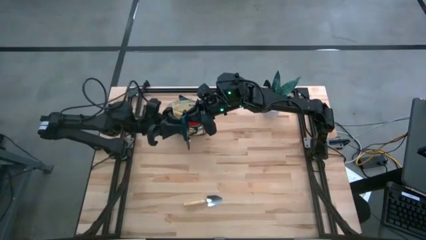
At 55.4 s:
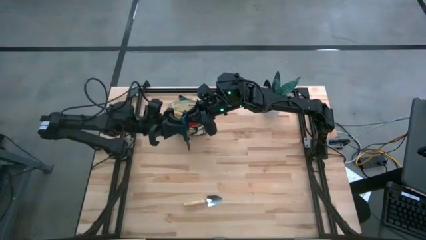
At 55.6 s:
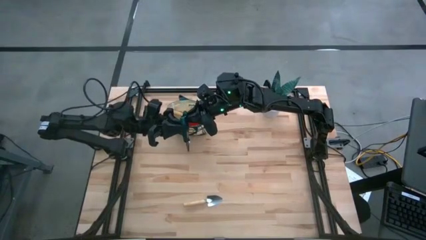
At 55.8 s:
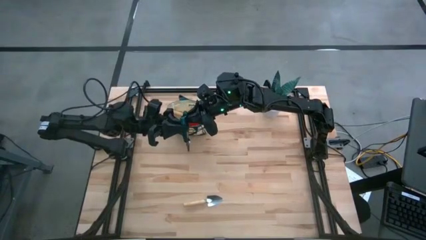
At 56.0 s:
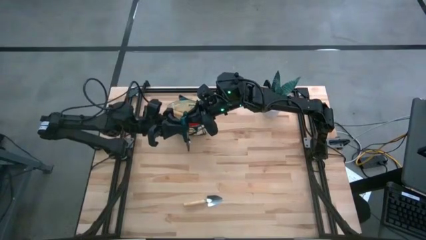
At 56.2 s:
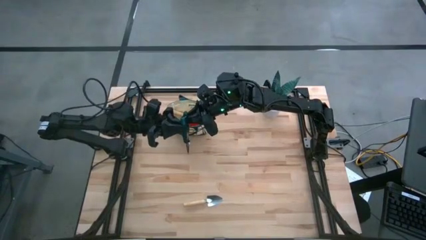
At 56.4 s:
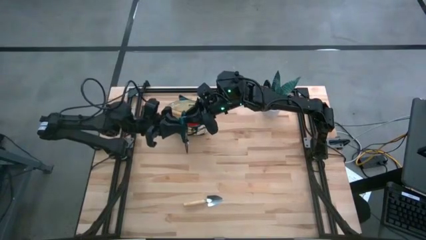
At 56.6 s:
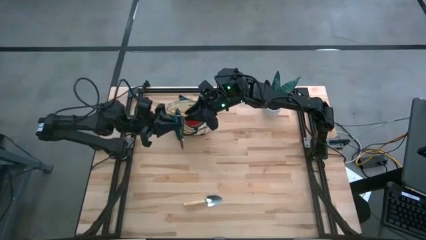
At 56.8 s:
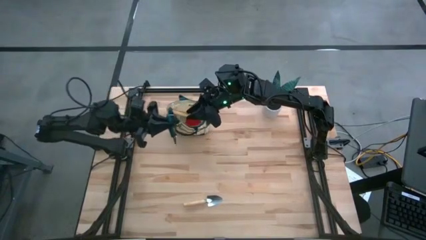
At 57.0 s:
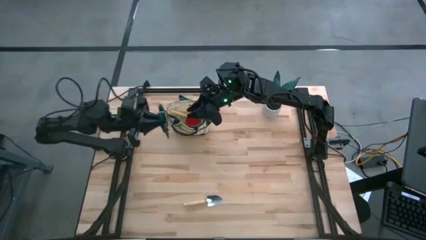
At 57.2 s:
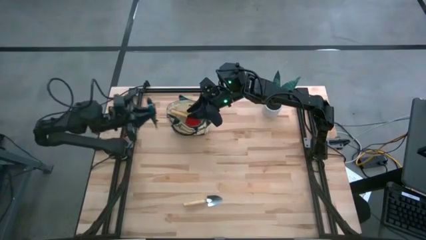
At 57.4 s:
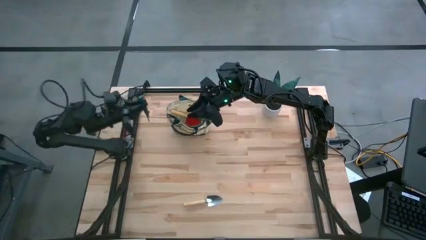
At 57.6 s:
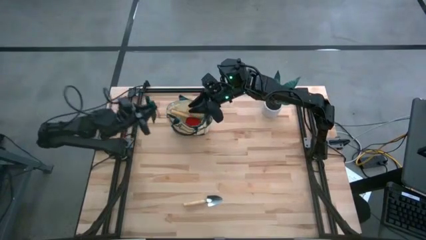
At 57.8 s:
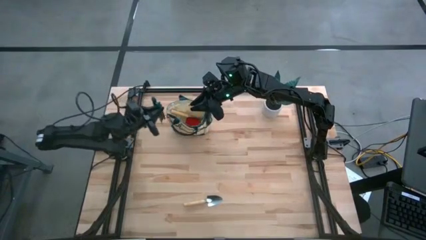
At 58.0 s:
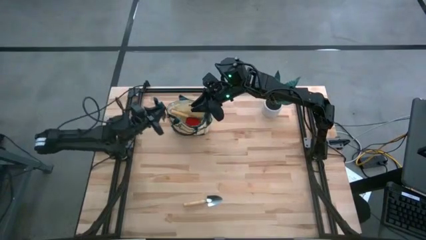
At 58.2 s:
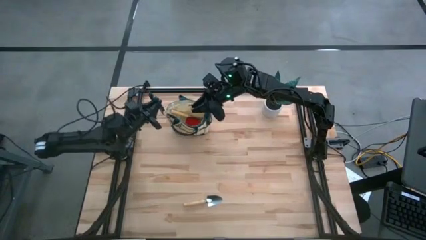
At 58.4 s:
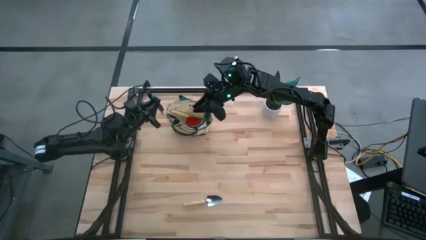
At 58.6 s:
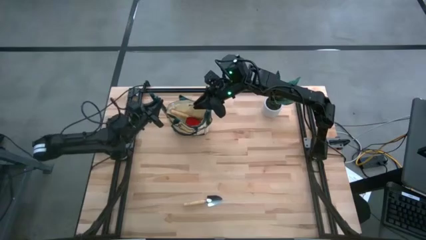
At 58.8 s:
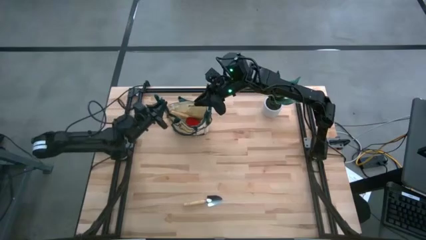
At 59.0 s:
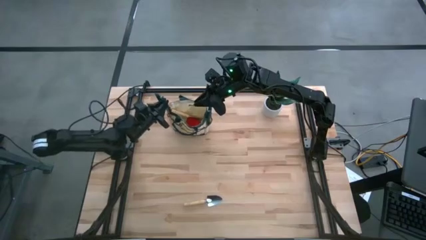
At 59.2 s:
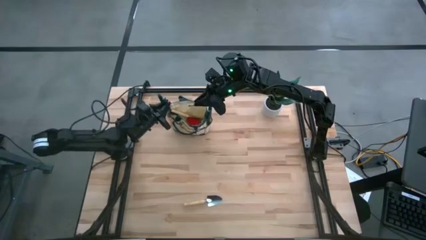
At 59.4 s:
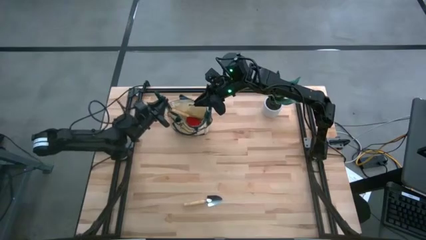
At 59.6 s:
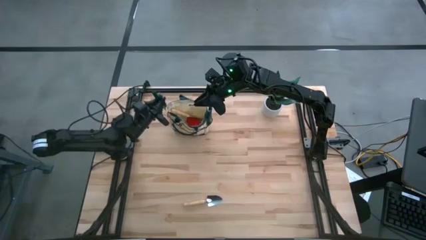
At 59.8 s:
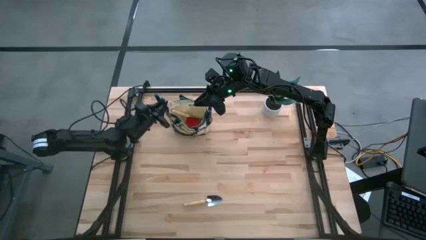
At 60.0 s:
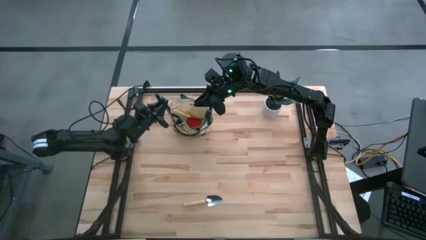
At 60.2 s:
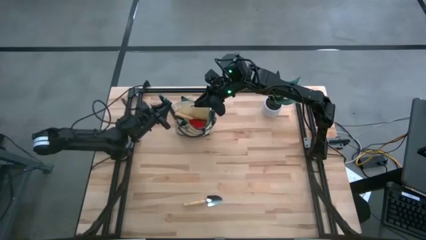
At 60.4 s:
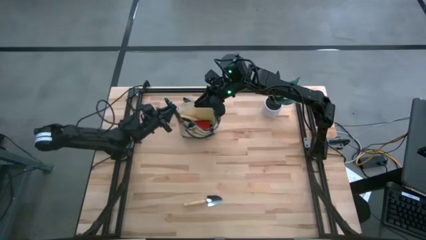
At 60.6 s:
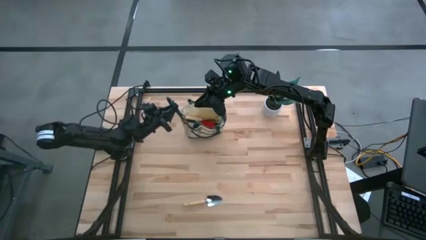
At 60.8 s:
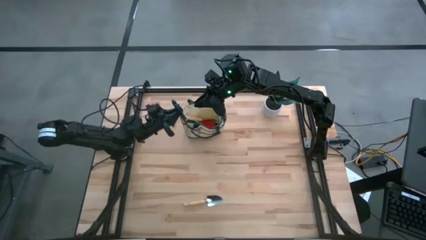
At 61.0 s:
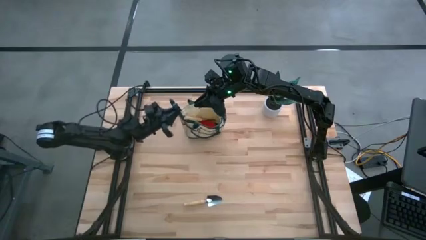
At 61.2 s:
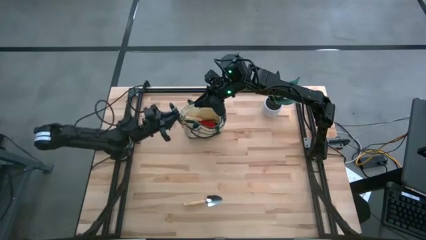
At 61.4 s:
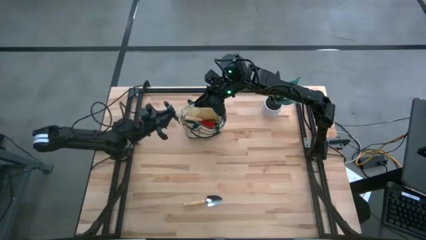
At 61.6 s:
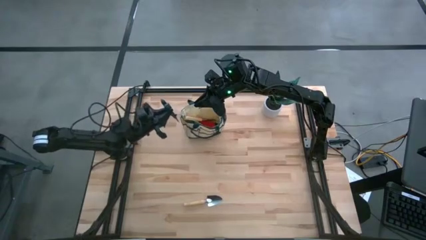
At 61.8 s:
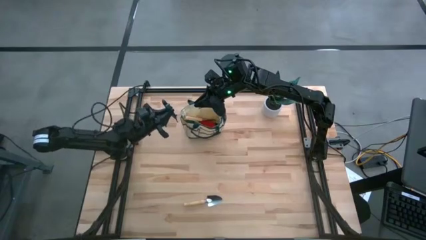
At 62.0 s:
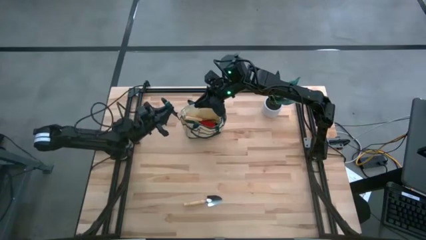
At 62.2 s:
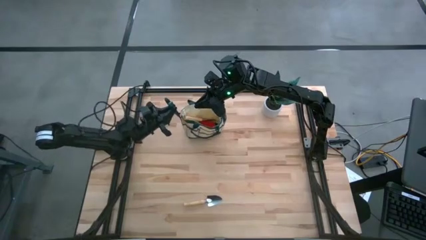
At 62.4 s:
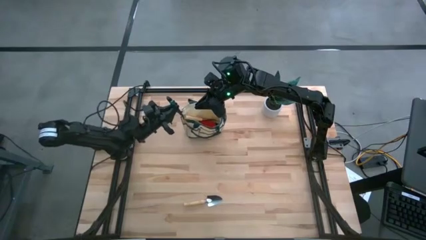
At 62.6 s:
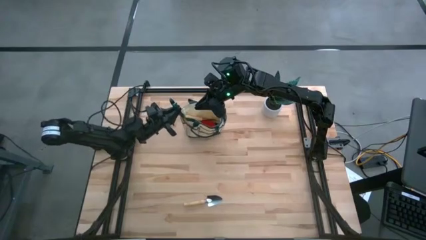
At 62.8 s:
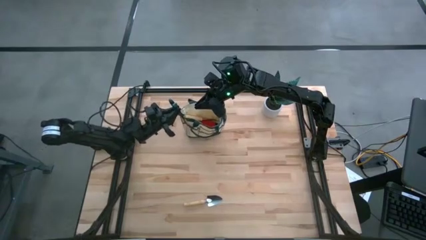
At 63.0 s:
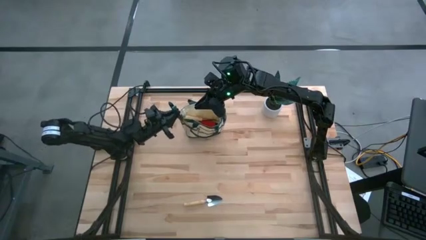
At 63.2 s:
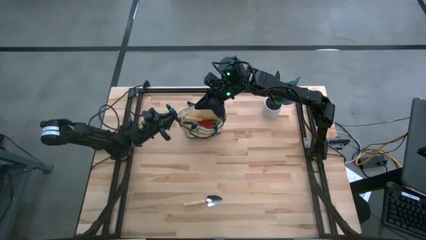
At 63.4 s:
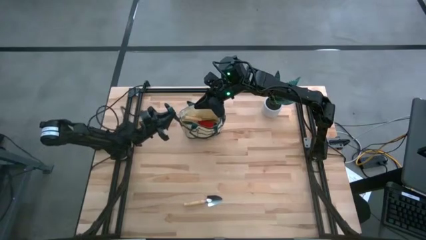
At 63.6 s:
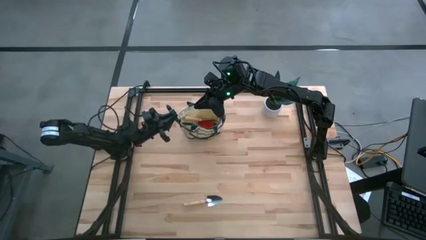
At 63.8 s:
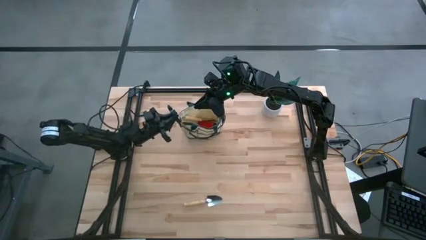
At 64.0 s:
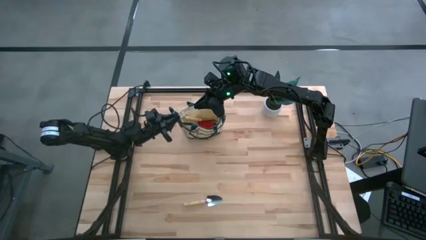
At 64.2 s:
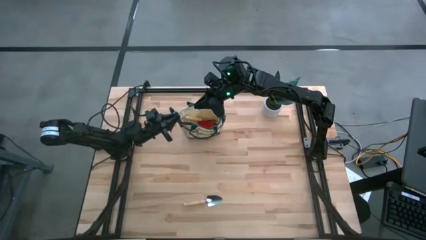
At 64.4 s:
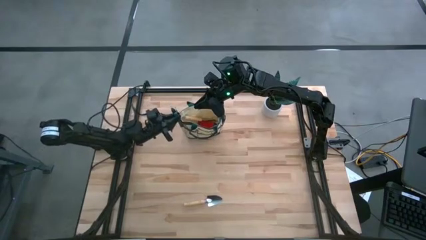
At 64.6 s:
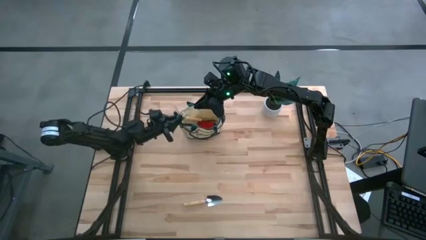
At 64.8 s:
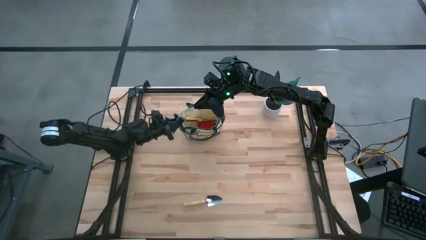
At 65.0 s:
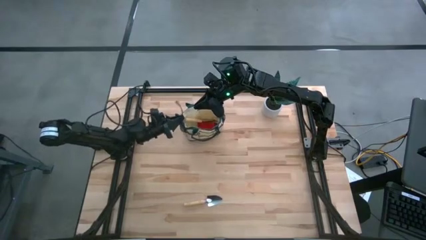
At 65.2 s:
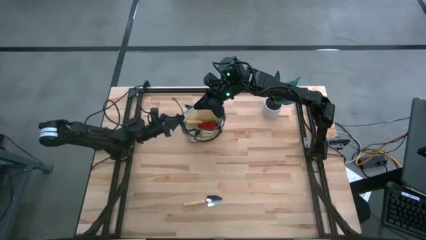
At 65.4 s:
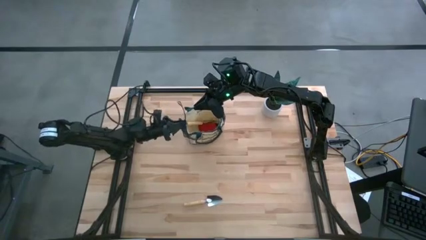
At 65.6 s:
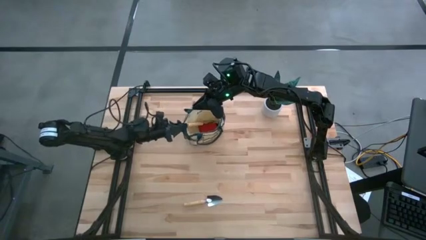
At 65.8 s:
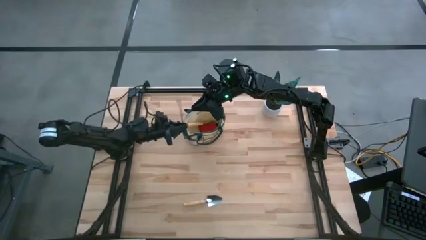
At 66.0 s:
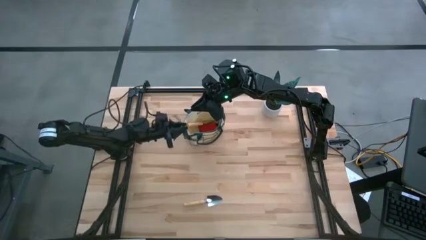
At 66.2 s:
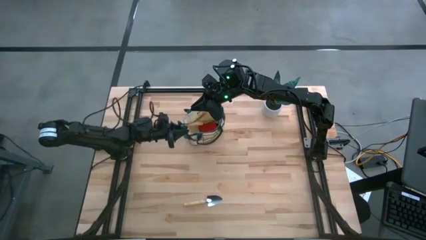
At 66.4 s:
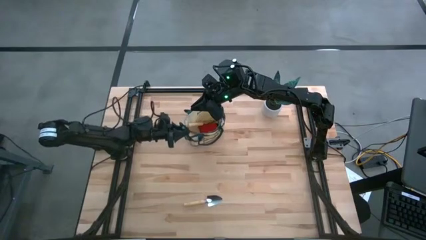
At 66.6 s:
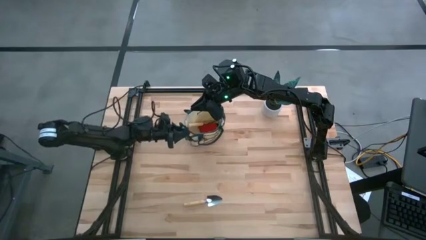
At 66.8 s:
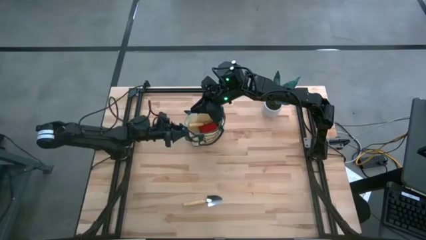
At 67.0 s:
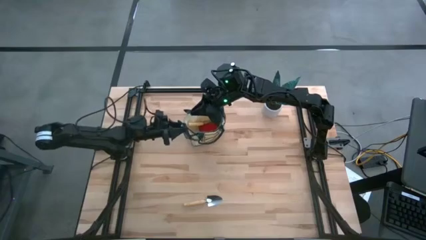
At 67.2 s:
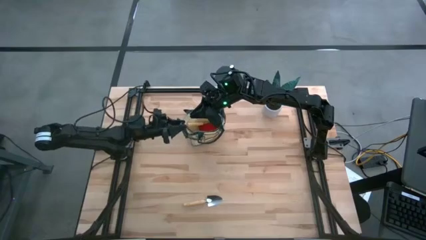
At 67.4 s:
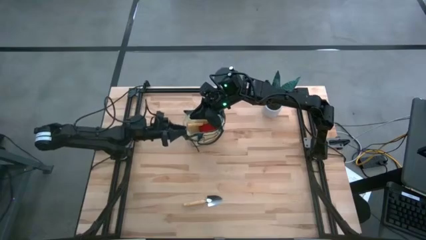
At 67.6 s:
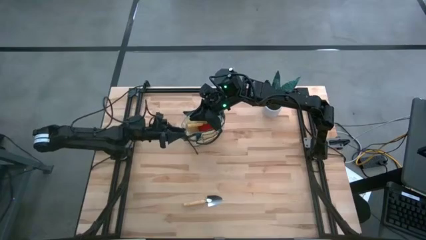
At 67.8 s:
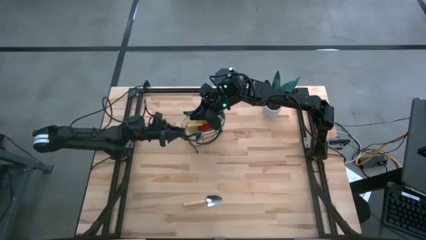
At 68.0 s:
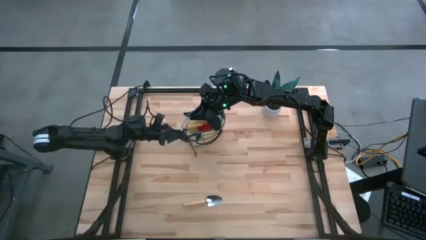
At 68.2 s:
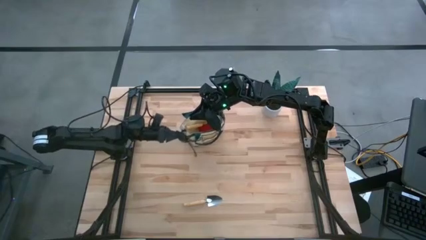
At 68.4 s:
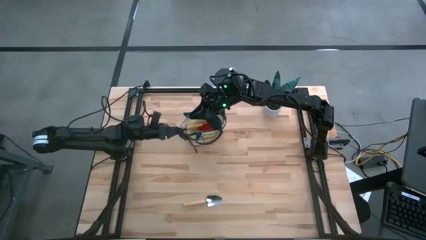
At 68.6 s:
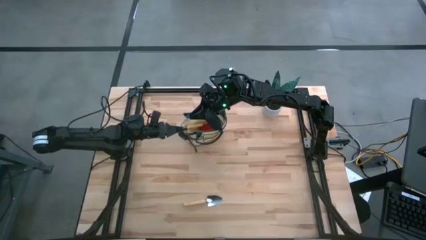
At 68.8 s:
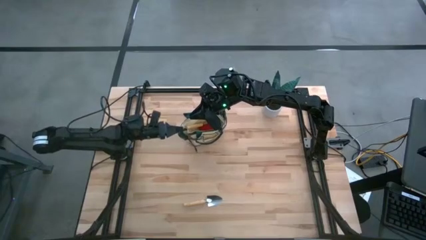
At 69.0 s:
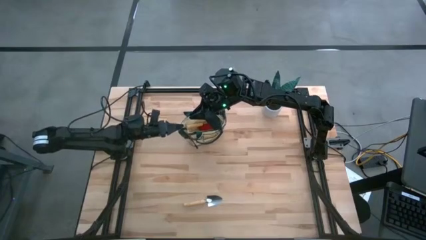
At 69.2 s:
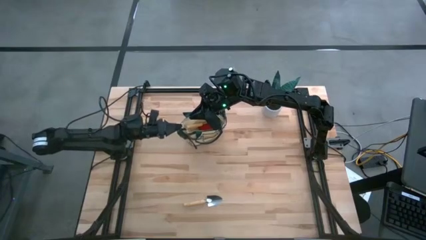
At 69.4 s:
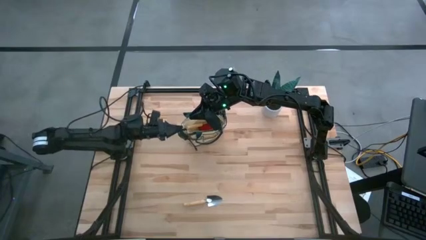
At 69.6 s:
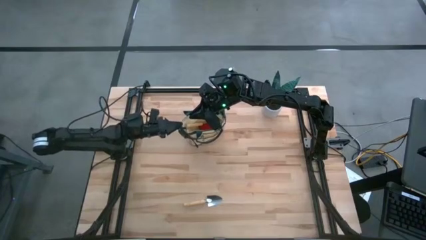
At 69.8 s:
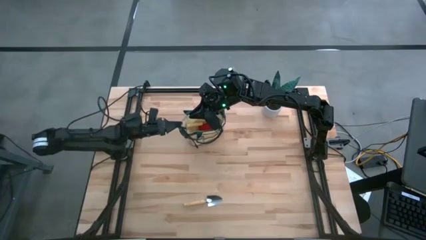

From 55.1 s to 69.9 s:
Task: Pick & Place Garden tools in Gardening bag
Put the shear scissor into the gardening bag
